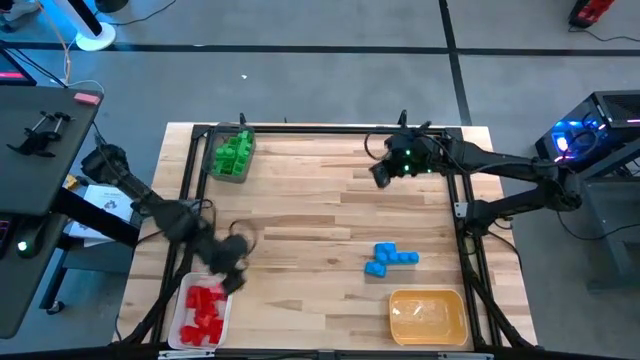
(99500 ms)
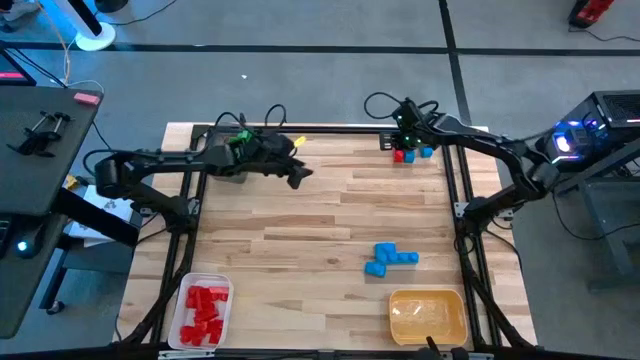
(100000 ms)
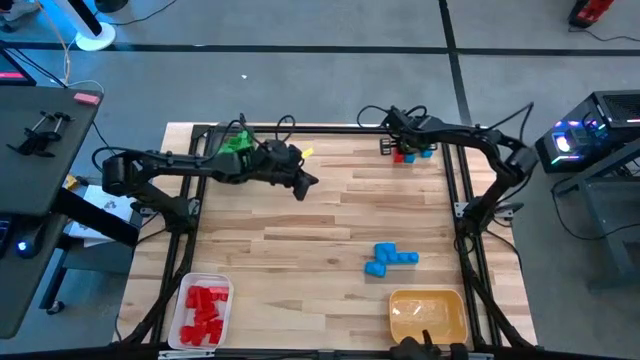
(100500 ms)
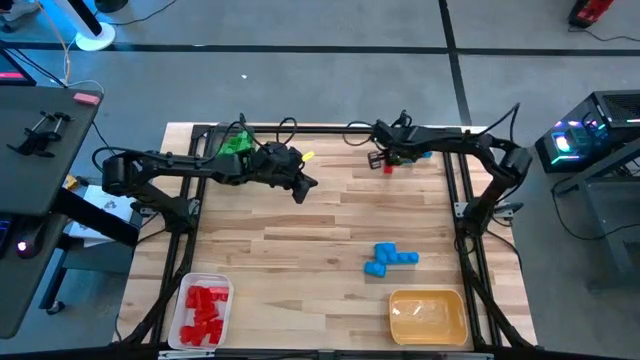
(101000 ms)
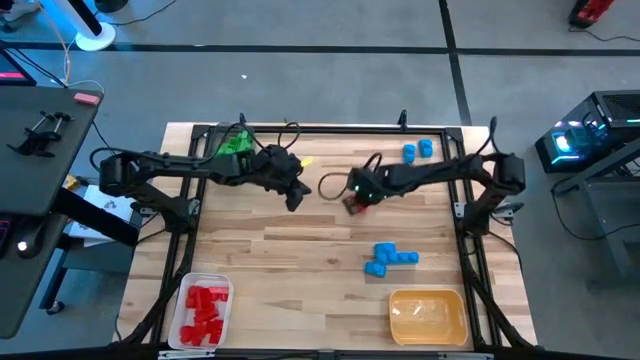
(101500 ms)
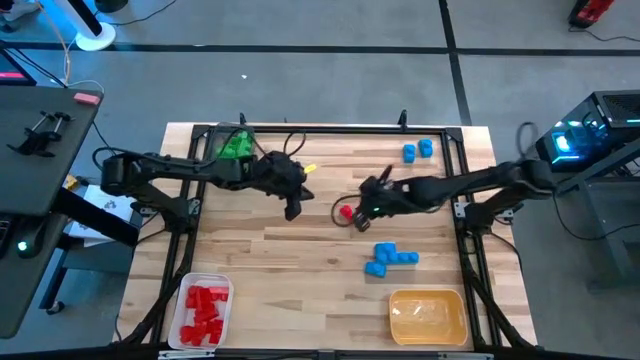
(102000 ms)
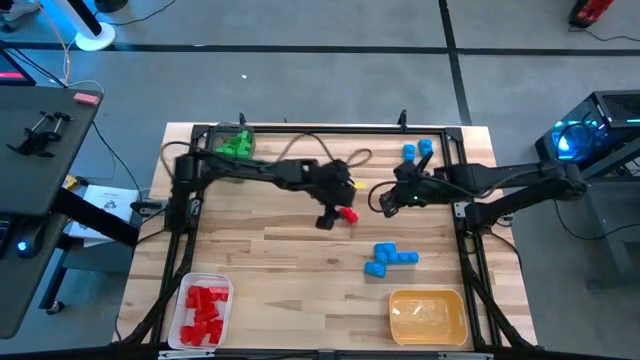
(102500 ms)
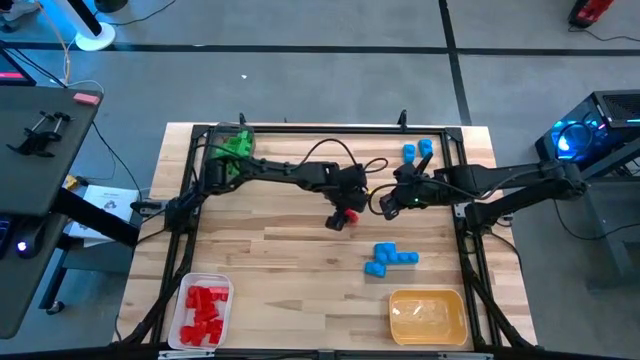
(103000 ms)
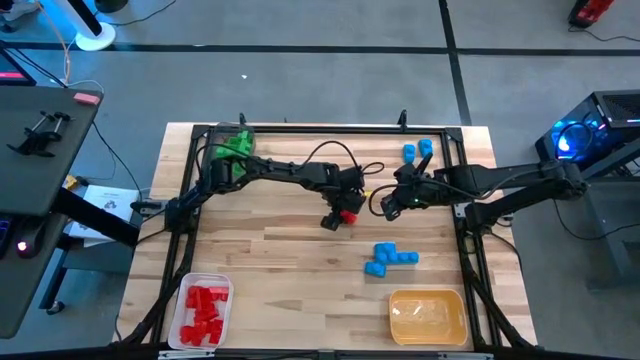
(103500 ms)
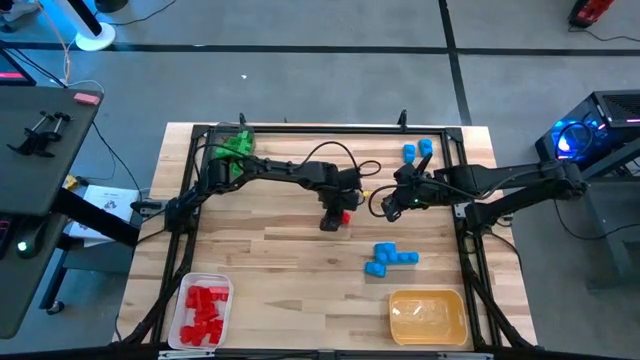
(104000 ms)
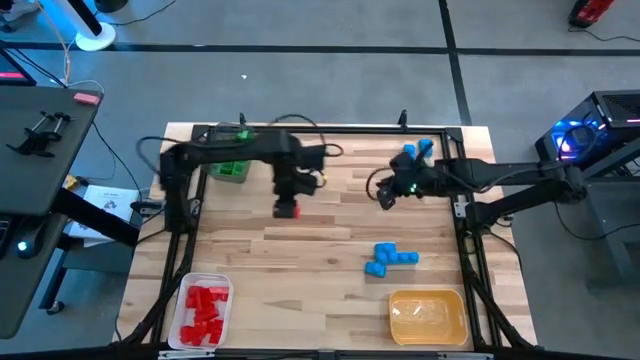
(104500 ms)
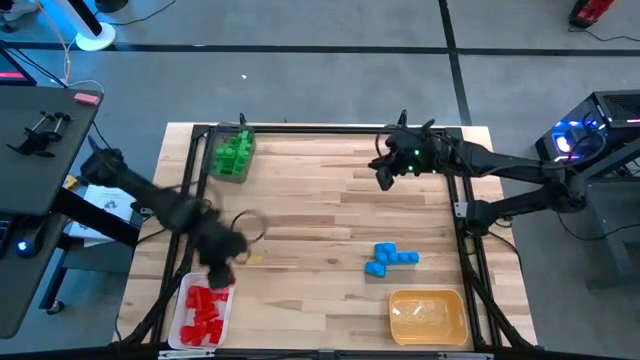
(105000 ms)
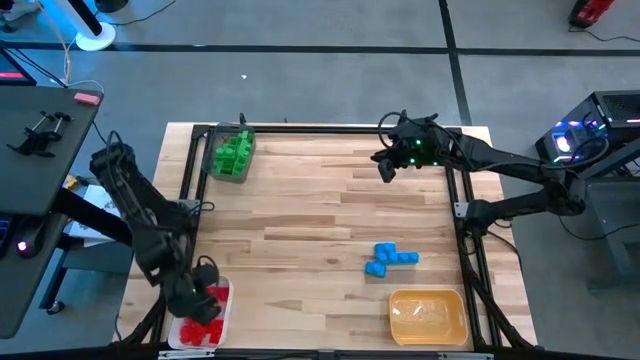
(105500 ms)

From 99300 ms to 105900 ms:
Task: Sort blocks
Put the red game piece into the white bin

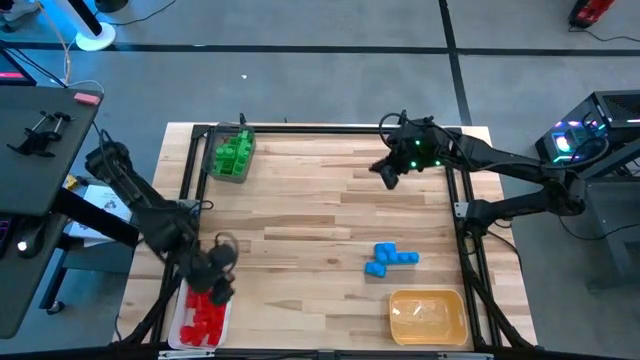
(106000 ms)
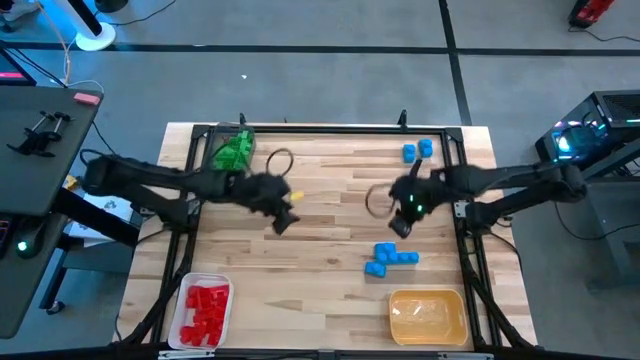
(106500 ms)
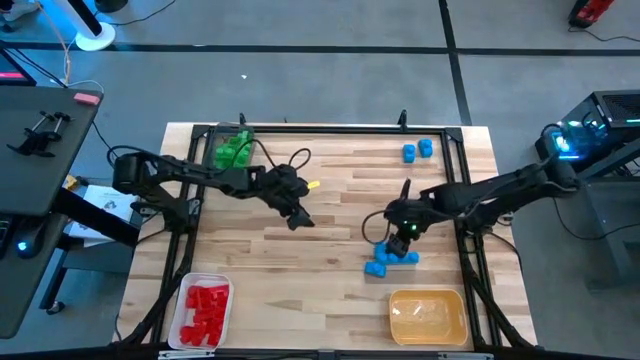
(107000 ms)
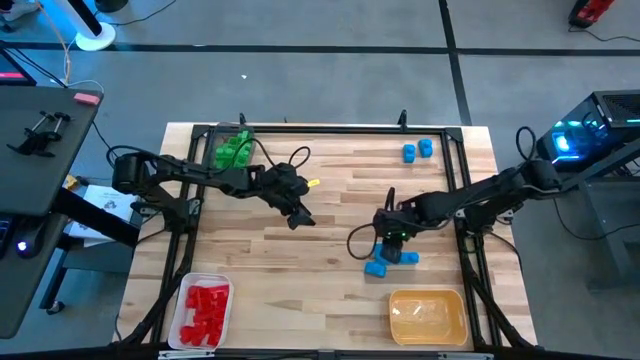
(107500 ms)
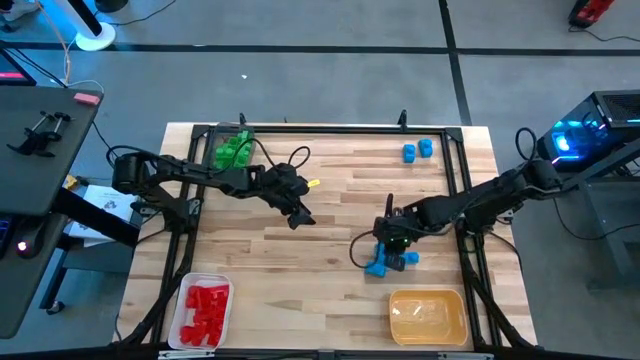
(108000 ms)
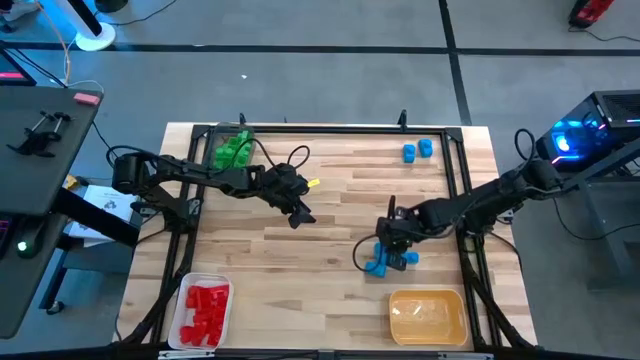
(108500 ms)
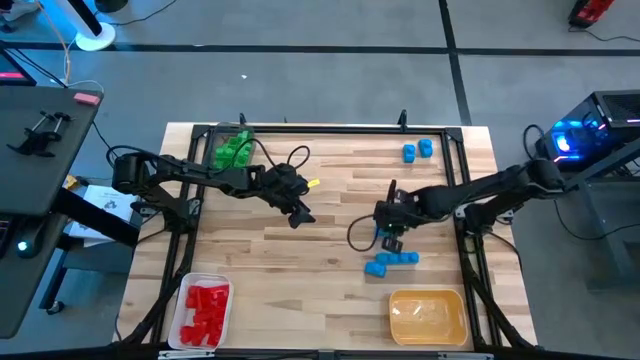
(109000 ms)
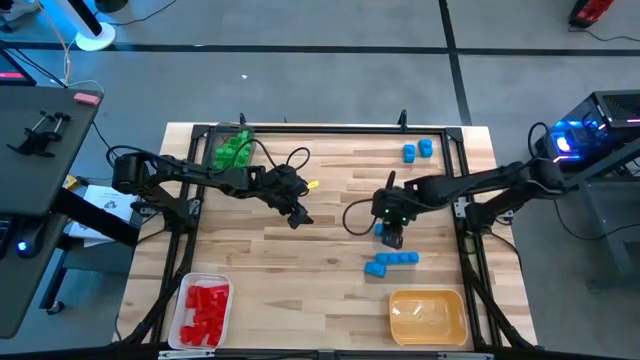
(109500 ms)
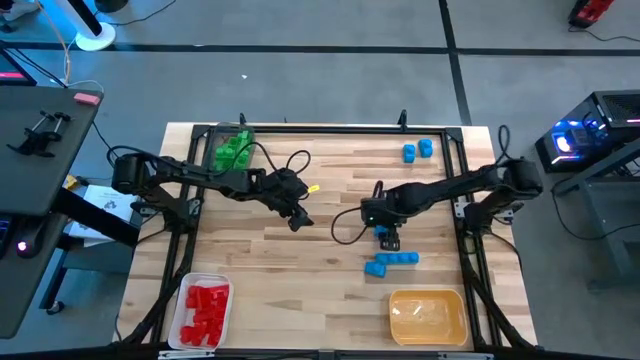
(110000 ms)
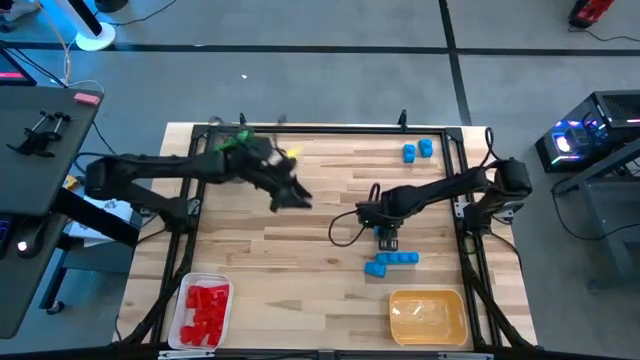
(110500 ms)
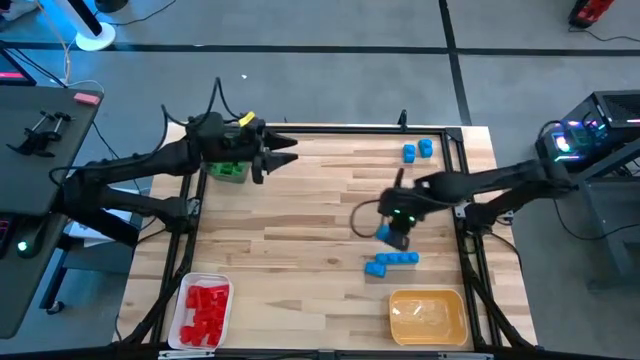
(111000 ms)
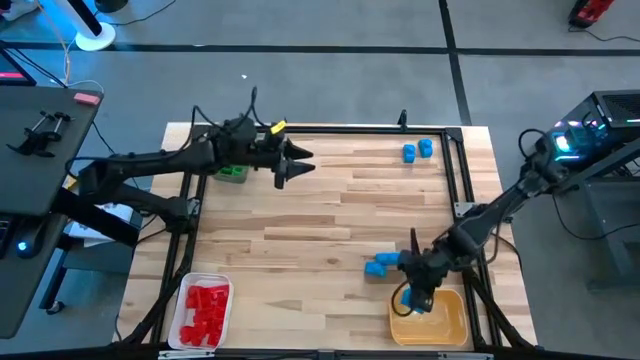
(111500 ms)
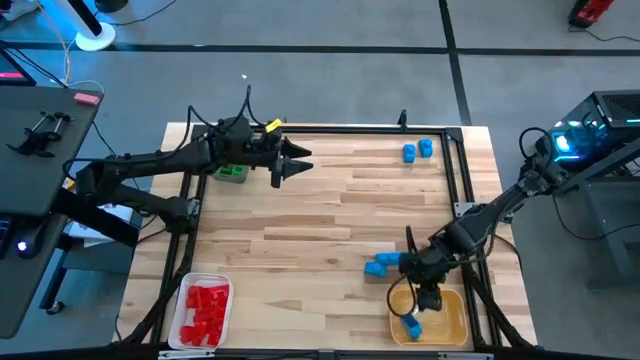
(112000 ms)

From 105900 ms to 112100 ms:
Put the blue game piece into the yellow bin

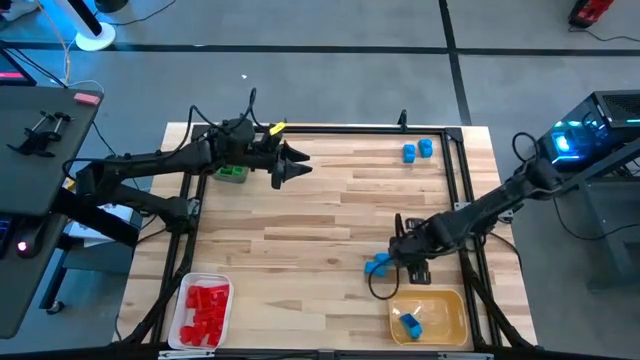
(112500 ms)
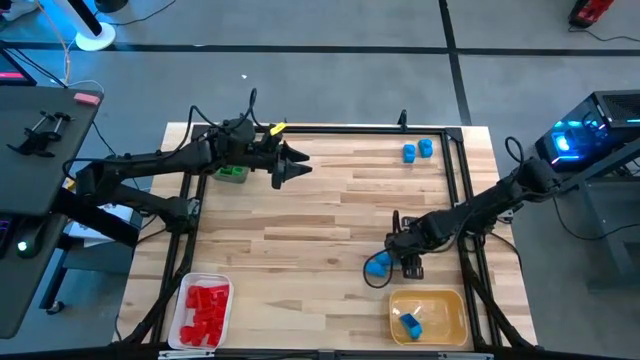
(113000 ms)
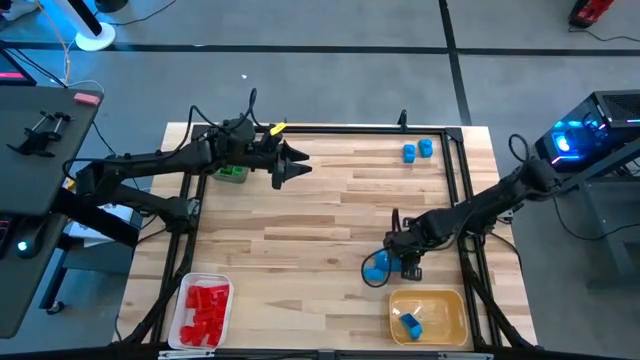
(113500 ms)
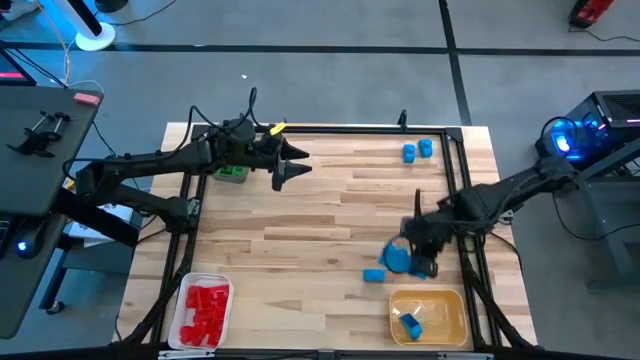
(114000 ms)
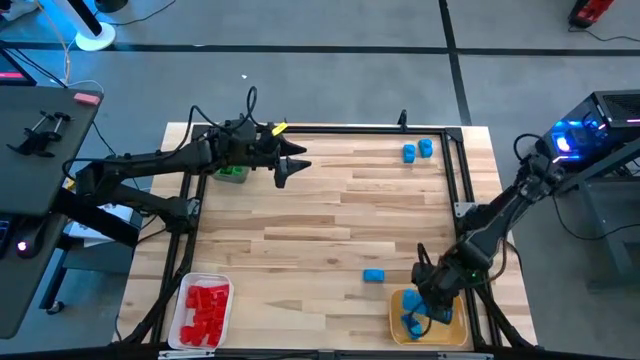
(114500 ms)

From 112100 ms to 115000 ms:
Put the blue game piece into the yellow bin

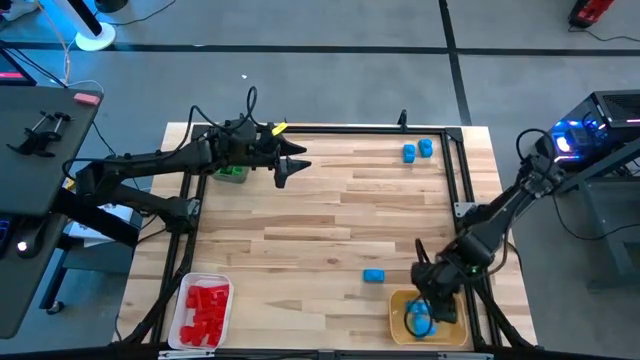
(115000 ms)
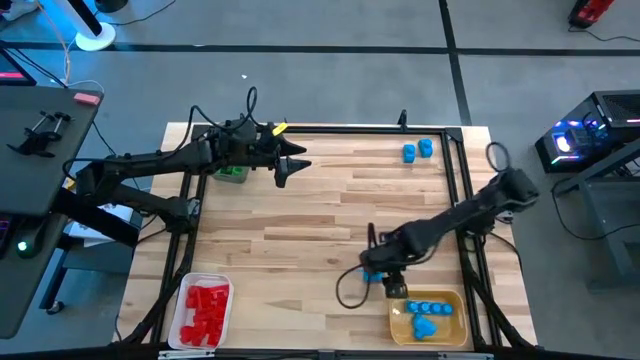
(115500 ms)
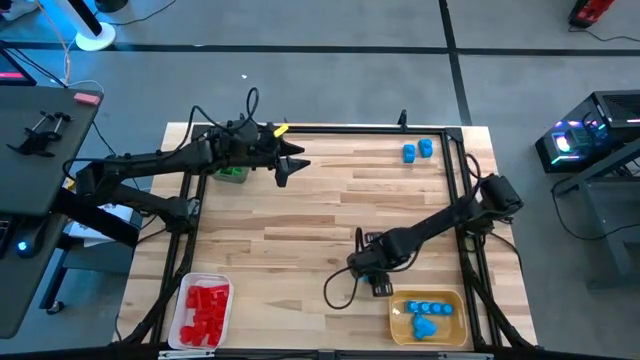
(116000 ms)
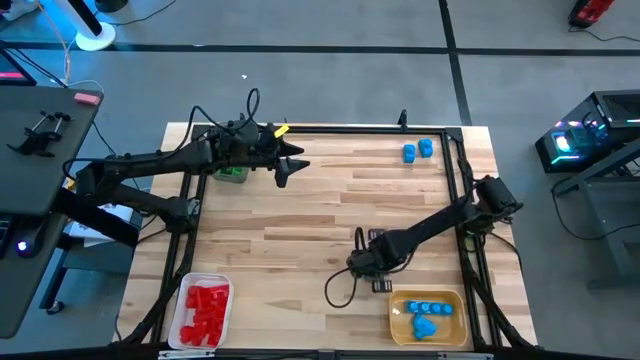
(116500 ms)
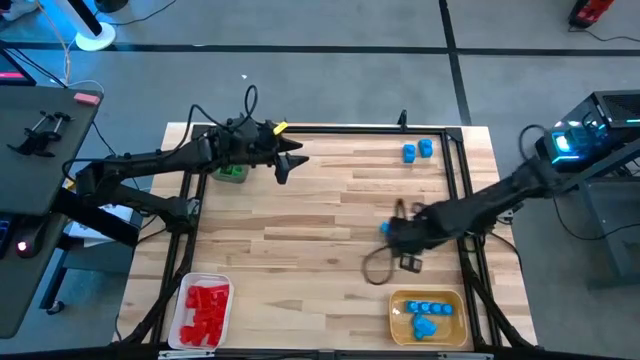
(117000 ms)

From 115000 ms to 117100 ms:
Put the blue game piece into the yellow bin

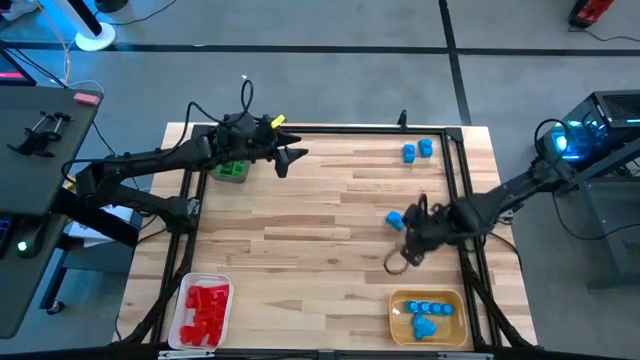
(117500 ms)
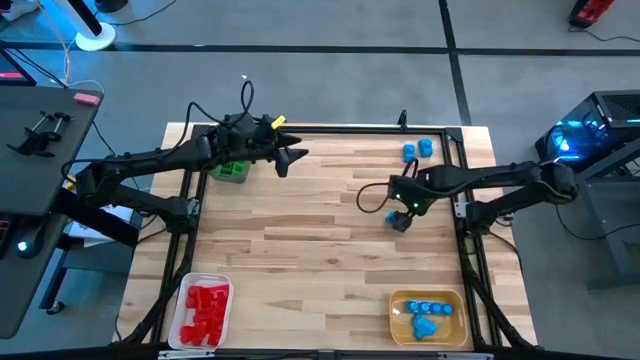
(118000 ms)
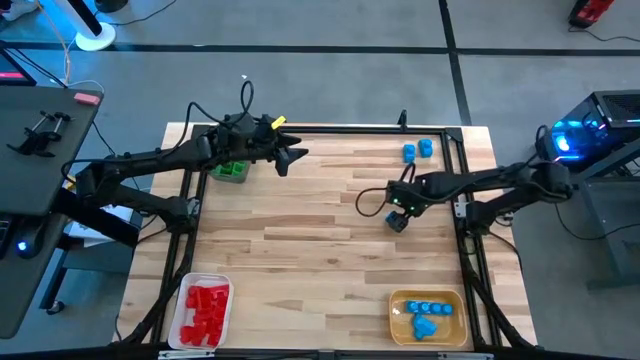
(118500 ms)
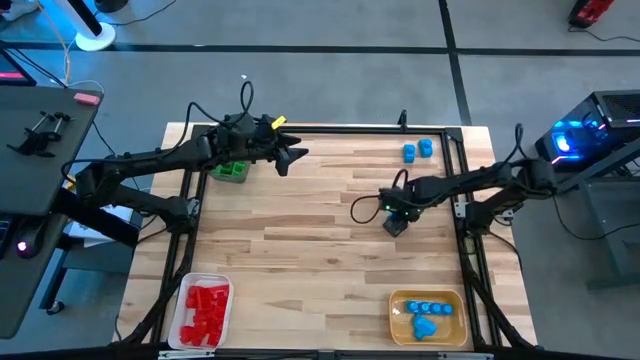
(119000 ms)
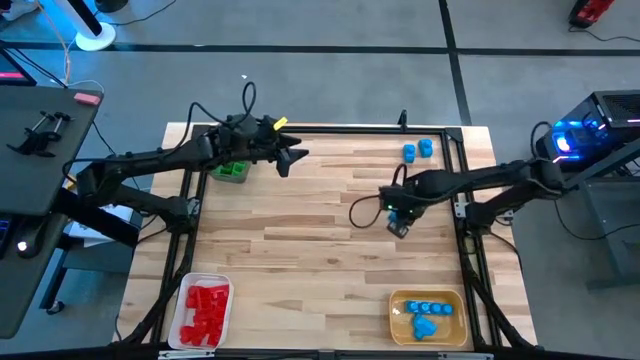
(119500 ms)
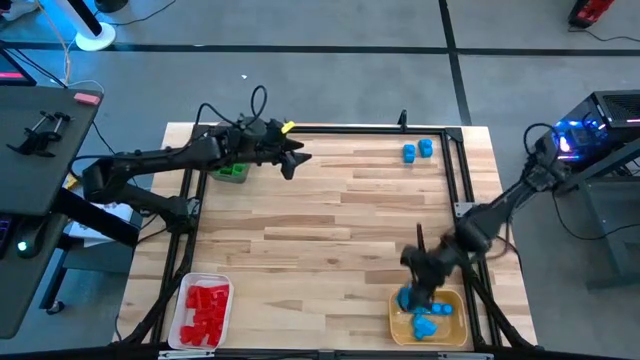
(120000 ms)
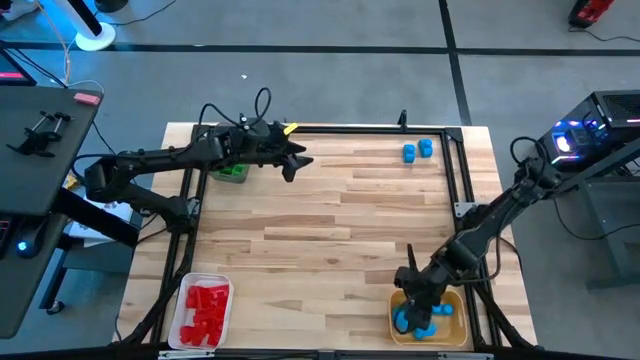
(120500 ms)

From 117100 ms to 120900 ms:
Put the blue game piece into the yellow bin
